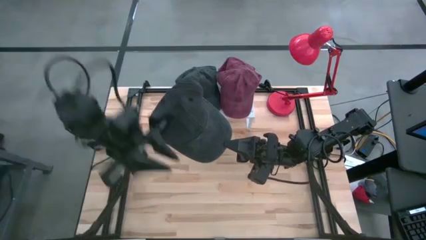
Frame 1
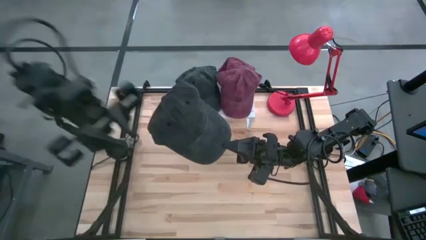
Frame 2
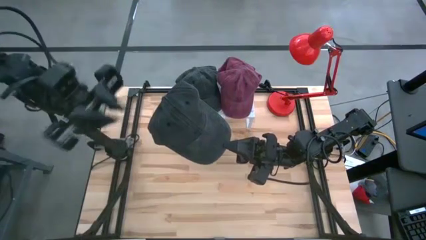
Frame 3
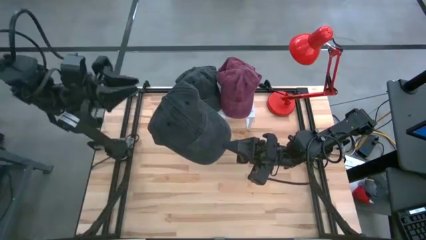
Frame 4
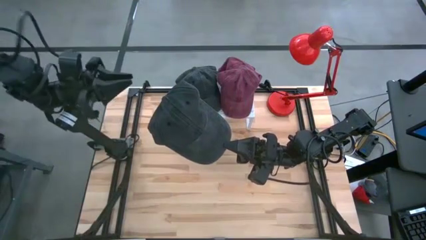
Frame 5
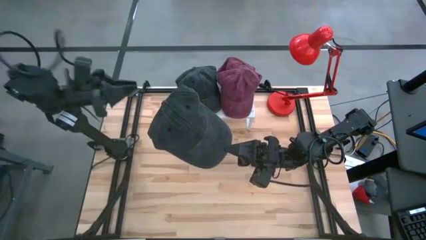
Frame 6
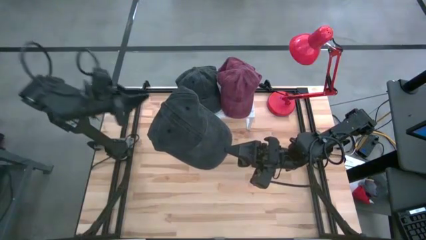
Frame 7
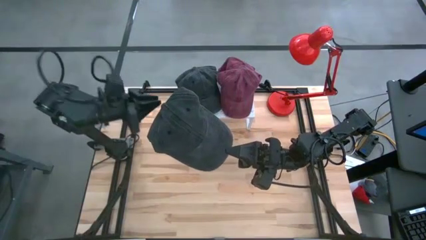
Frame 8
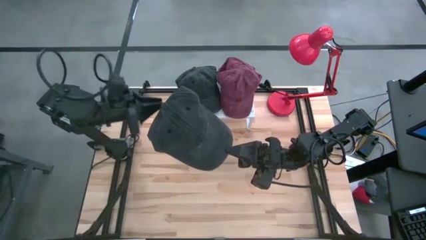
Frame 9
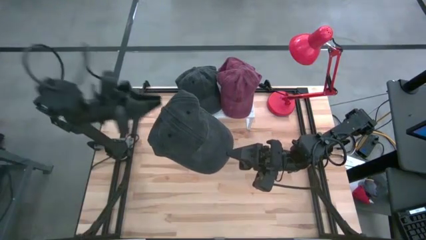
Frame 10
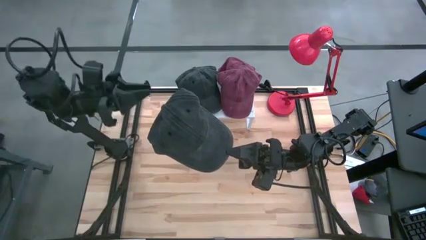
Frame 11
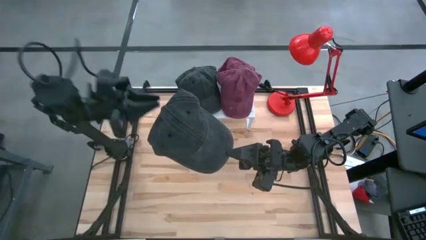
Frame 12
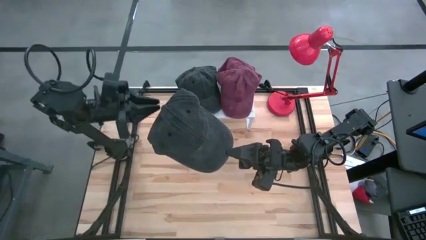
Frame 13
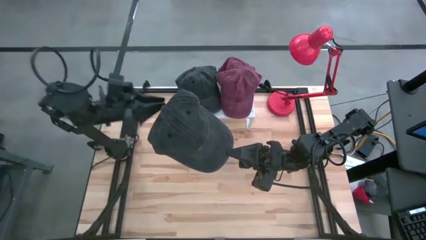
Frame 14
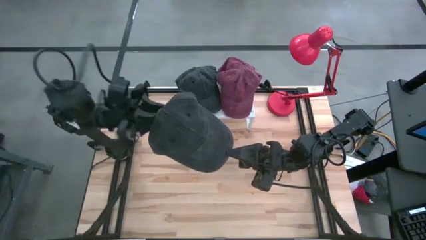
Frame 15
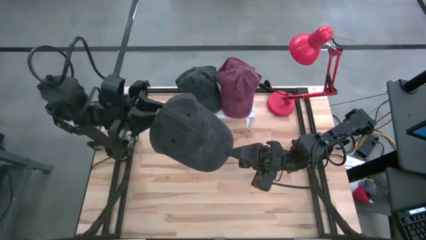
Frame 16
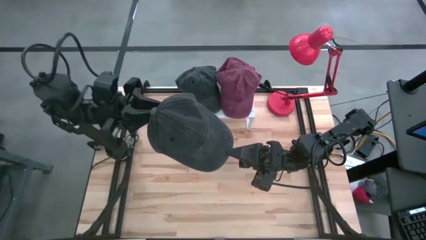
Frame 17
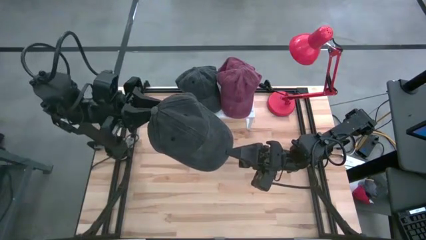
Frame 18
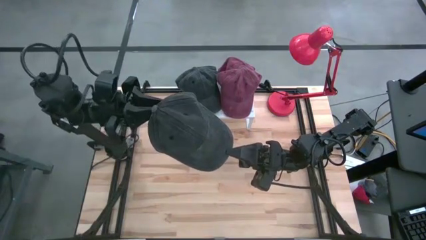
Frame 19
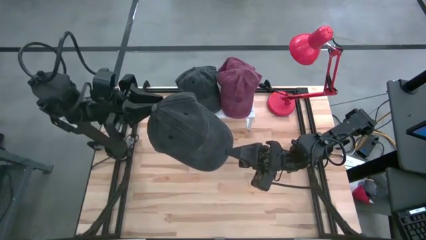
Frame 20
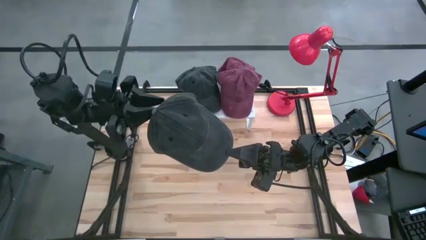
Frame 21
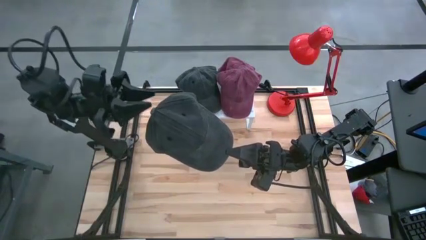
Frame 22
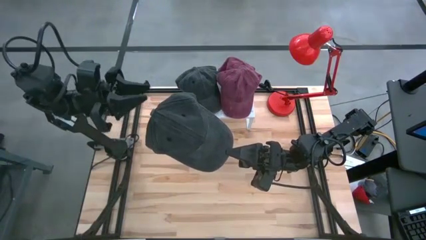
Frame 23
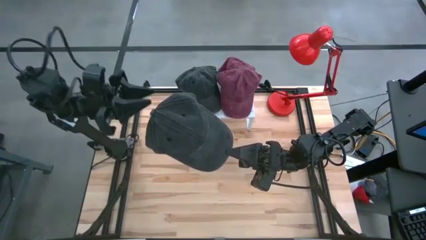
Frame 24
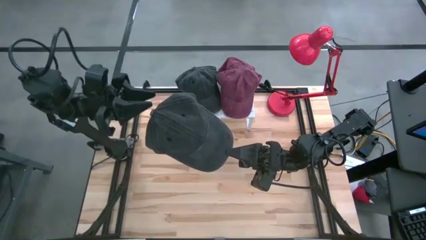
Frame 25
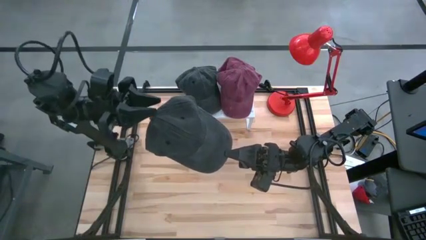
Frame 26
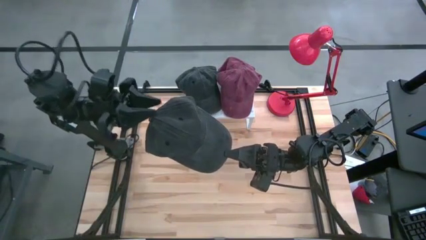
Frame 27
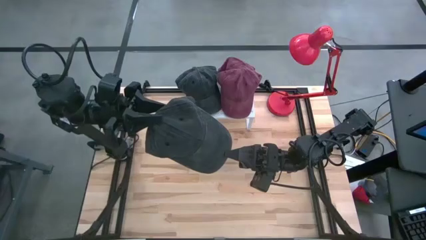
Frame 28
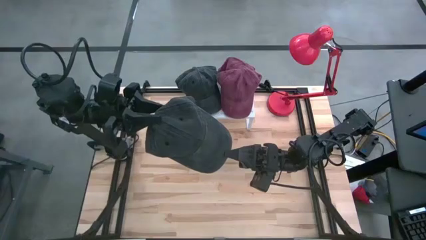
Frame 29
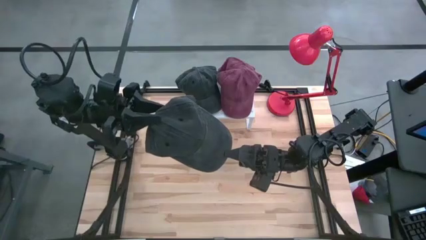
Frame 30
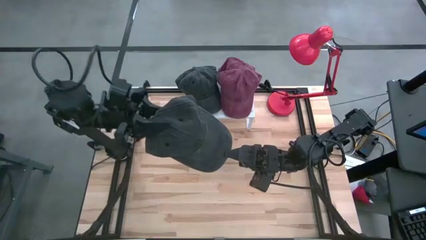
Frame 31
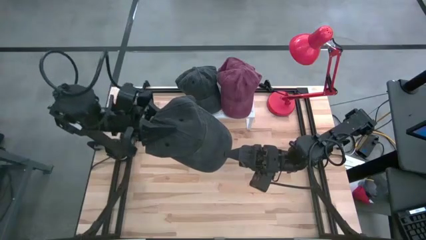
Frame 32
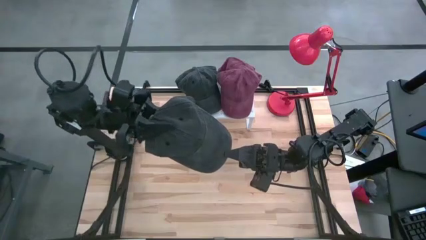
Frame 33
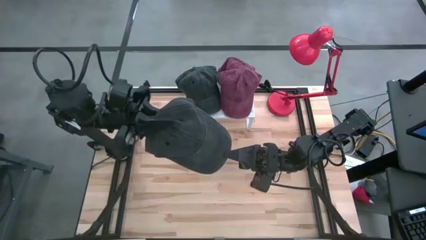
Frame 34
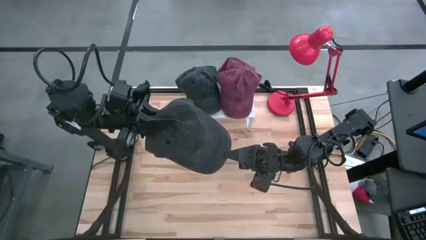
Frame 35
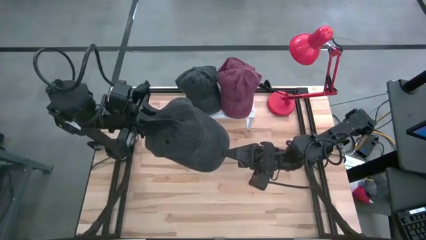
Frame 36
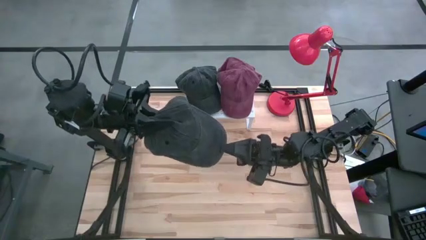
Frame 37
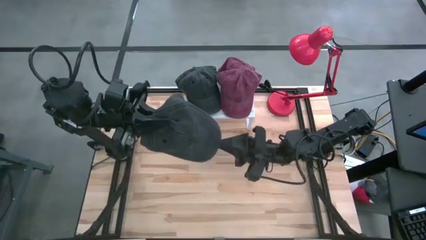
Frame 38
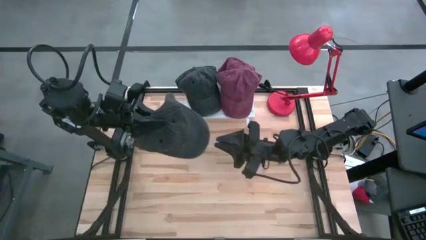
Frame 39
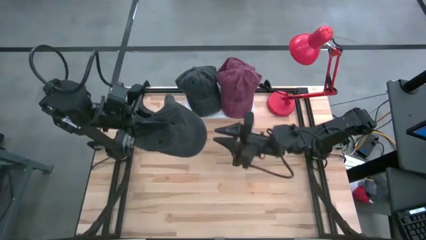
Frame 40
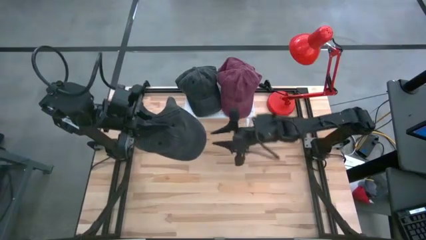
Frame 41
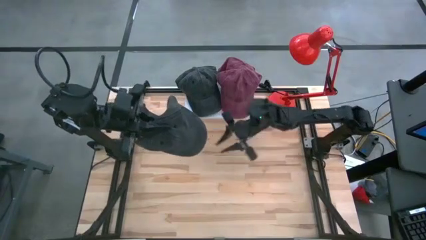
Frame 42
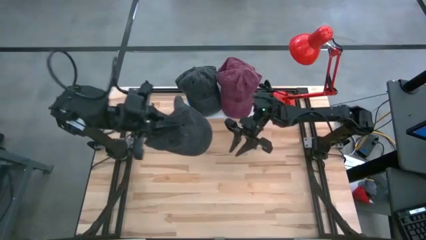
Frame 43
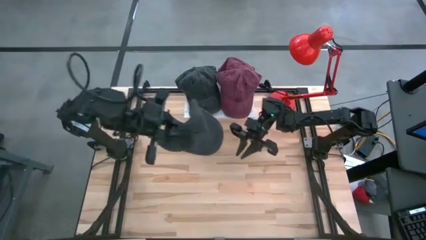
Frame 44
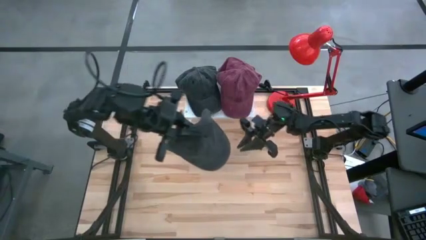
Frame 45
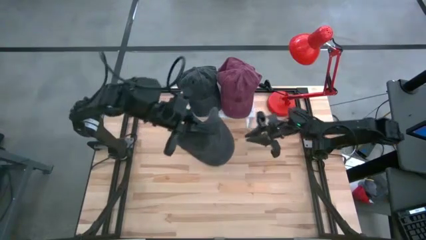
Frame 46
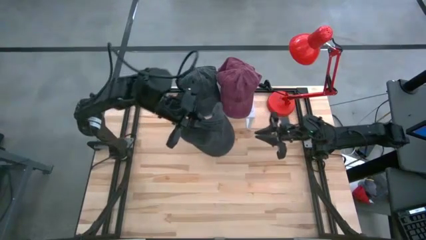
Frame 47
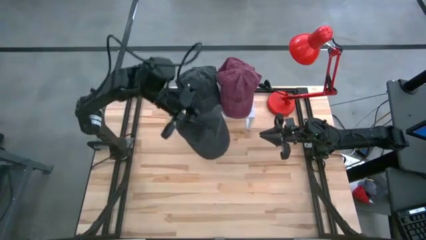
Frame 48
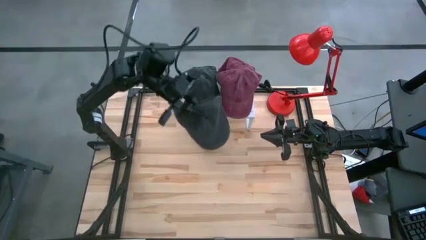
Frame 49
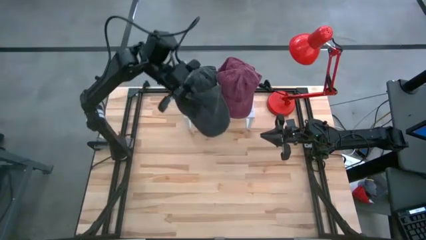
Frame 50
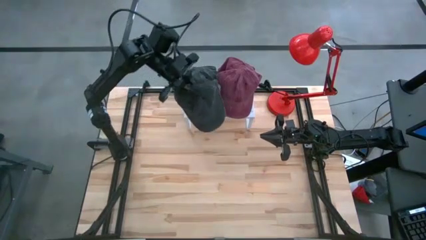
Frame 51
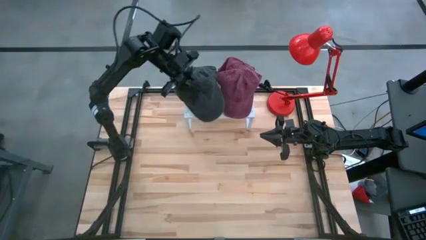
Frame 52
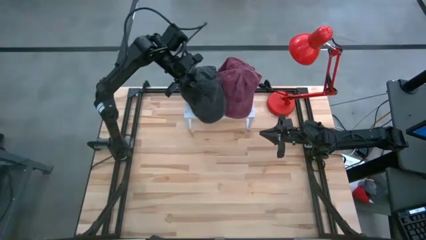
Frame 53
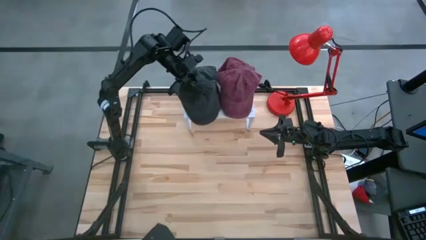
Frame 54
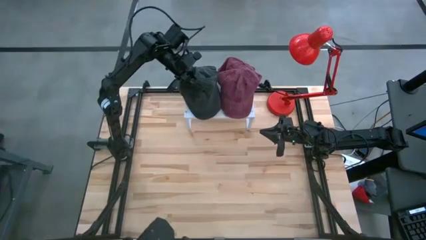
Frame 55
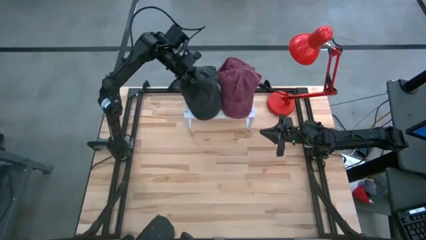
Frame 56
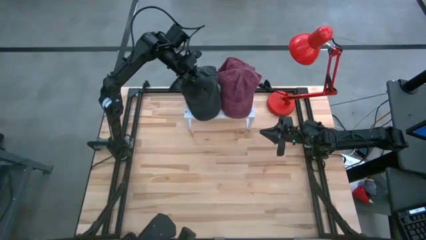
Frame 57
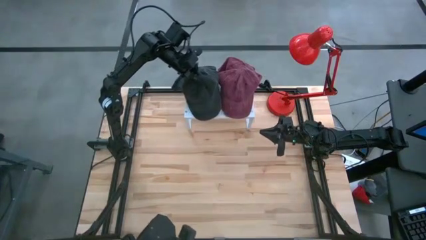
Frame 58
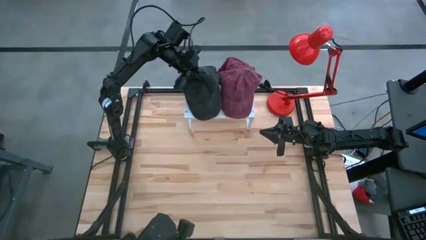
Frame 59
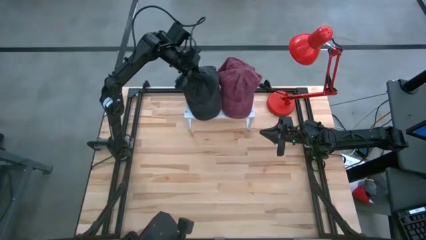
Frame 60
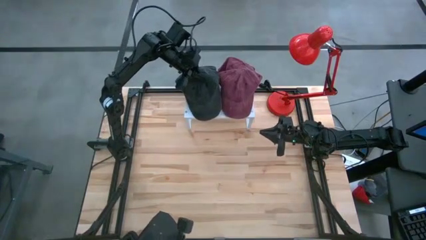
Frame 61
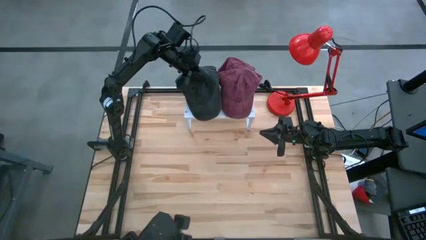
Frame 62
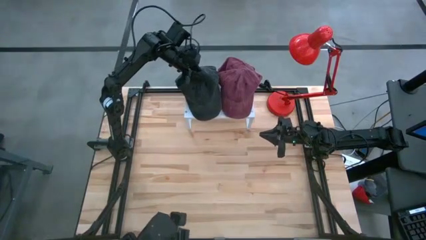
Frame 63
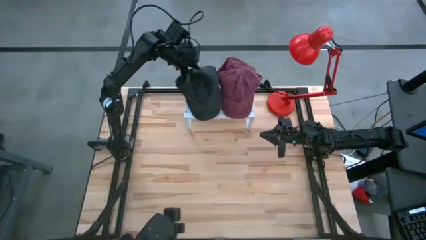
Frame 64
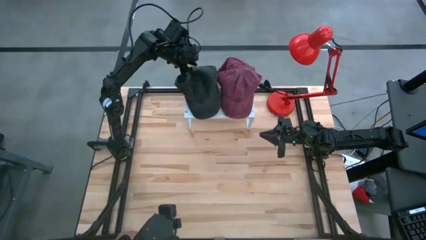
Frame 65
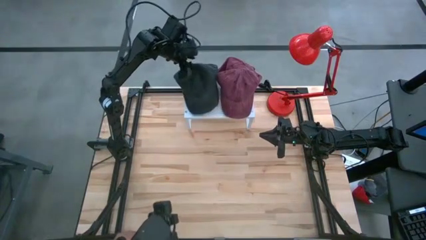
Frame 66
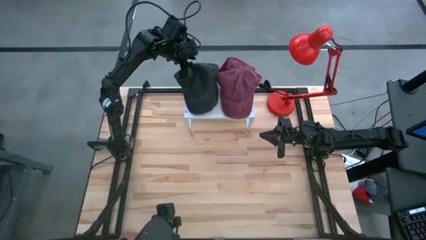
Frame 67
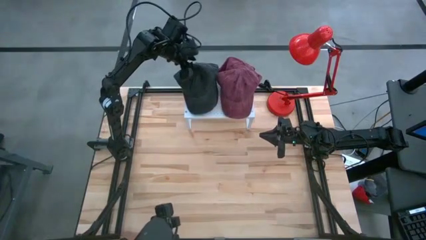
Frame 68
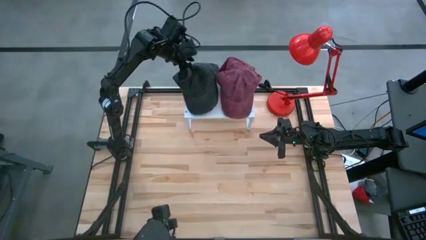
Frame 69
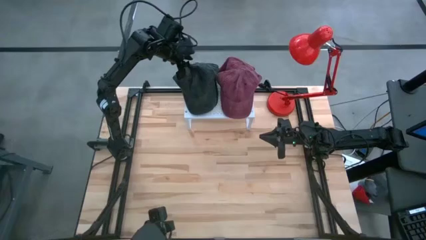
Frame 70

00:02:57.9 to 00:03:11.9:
Task: Pick & Place hat
Stack the black cap on top of the black cap on the shelf

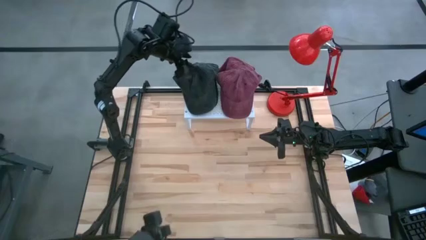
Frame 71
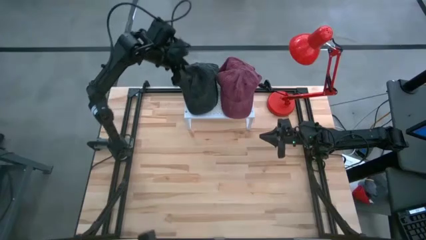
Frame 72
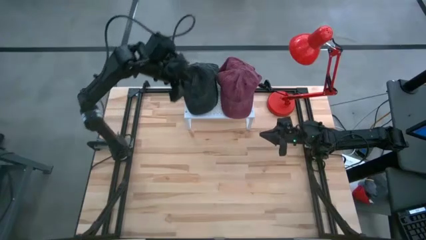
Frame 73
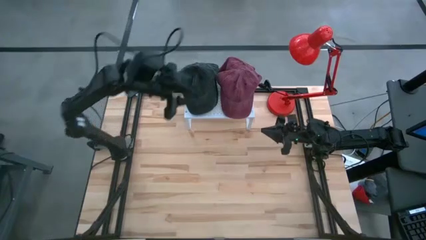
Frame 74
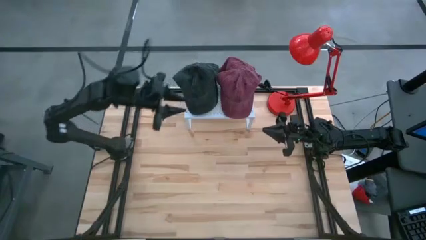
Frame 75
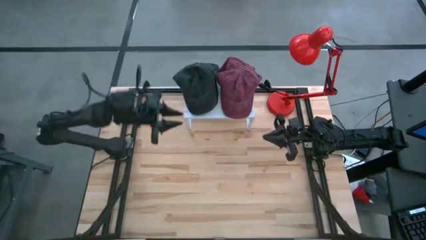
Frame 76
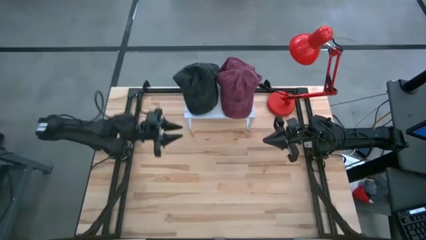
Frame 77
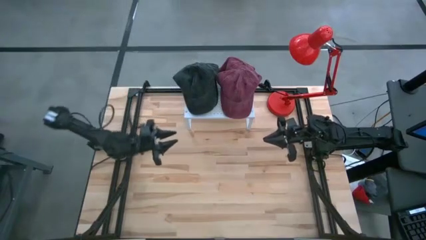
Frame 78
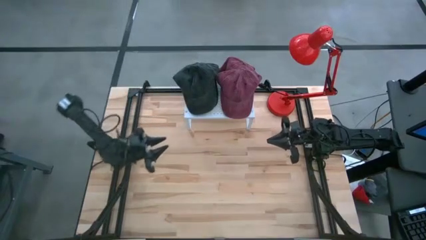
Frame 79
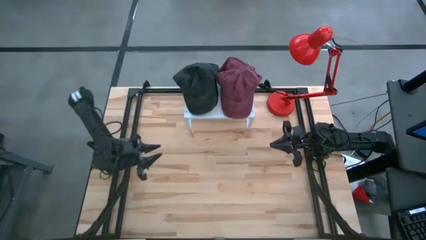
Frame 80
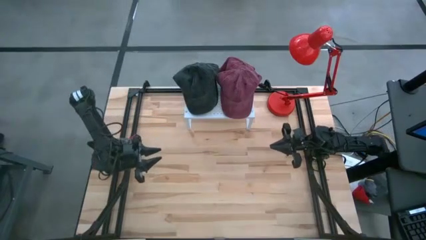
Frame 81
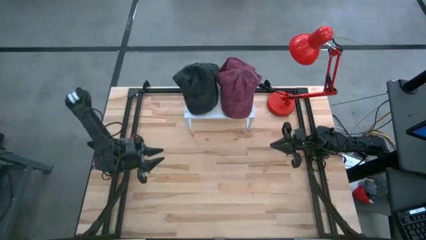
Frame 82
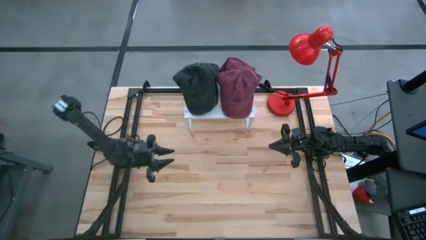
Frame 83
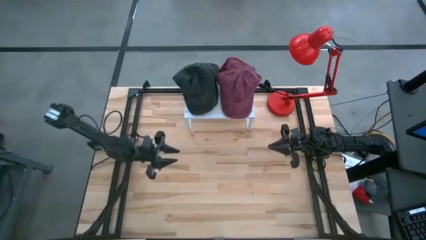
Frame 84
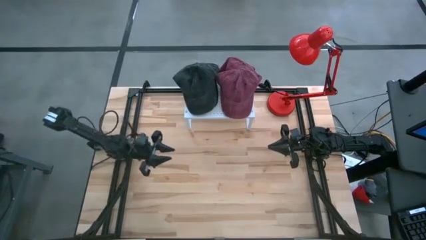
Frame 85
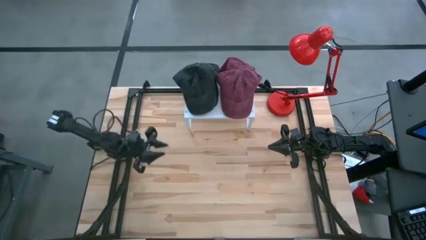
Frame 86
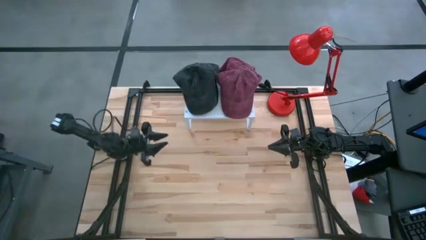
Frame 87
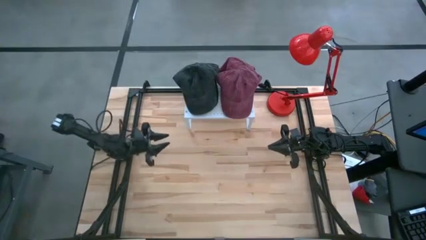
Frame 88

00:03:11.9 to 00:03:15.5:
Return to Home Position
